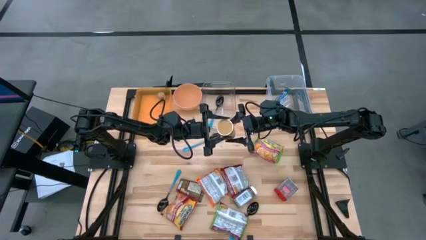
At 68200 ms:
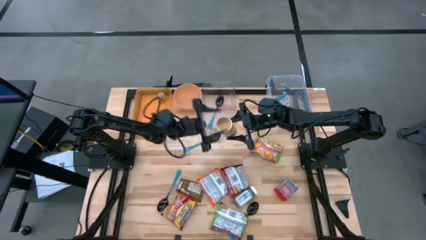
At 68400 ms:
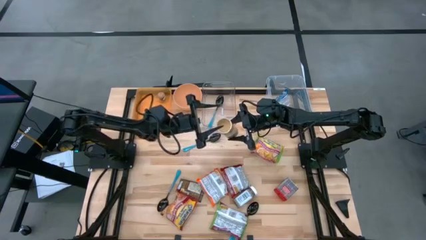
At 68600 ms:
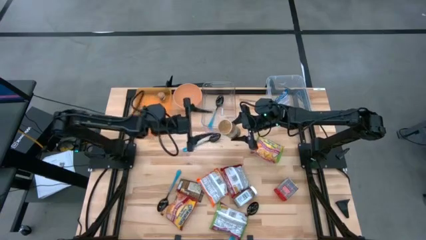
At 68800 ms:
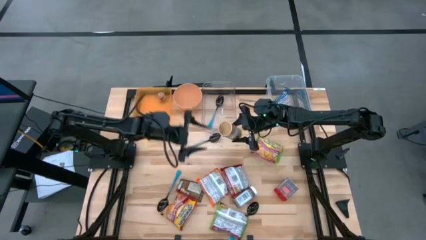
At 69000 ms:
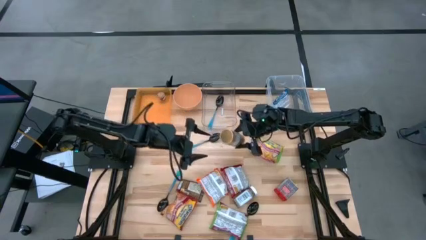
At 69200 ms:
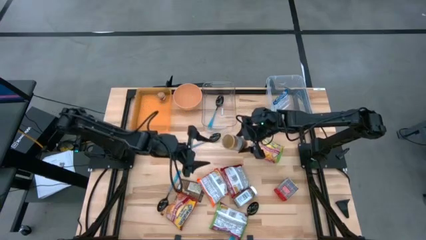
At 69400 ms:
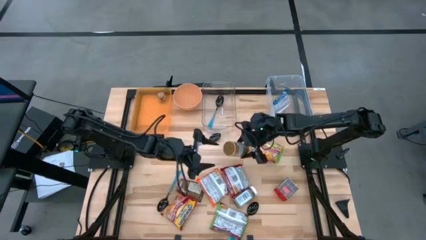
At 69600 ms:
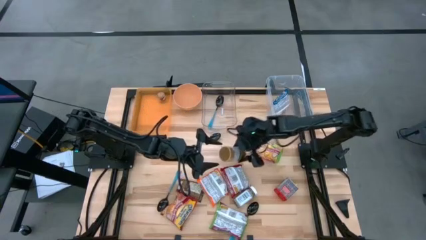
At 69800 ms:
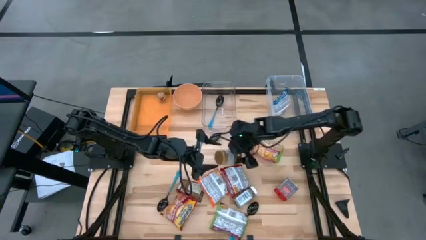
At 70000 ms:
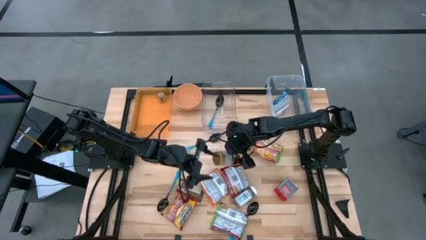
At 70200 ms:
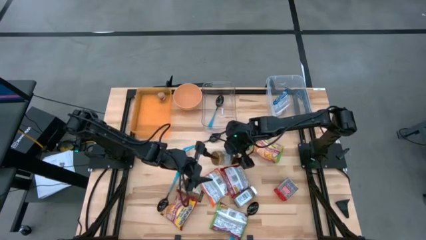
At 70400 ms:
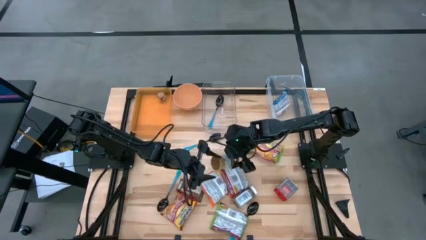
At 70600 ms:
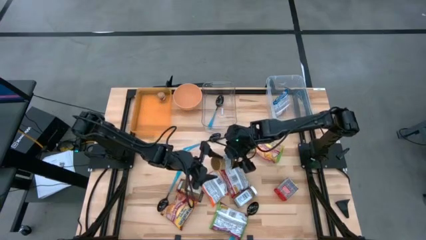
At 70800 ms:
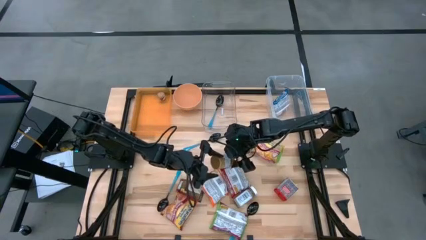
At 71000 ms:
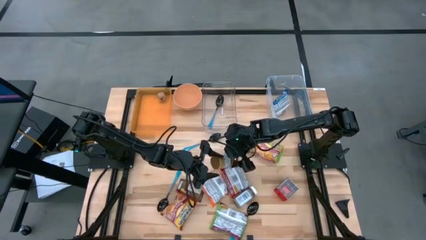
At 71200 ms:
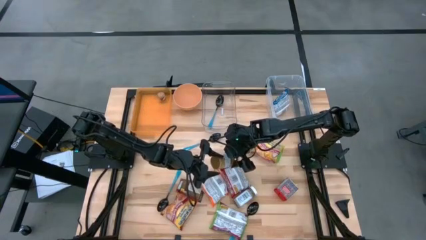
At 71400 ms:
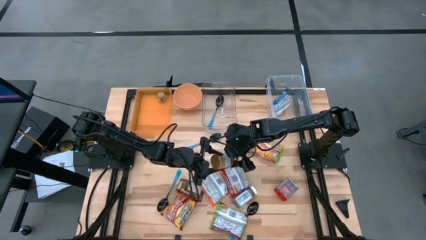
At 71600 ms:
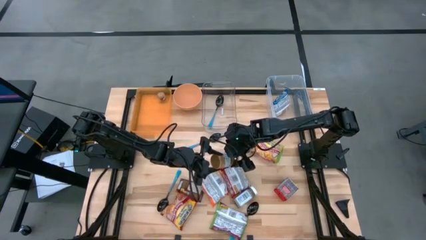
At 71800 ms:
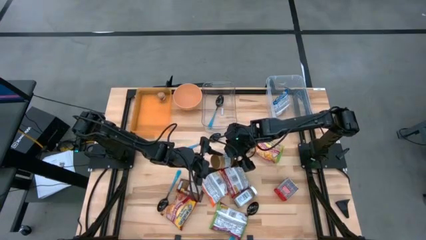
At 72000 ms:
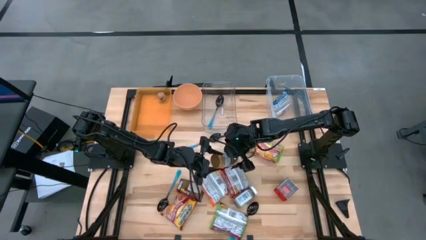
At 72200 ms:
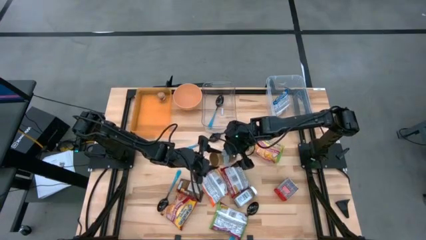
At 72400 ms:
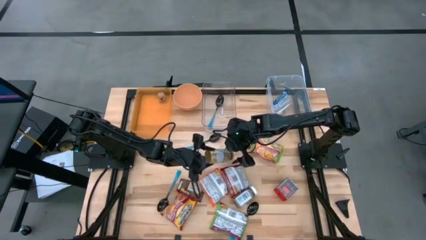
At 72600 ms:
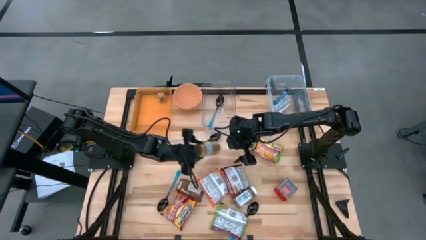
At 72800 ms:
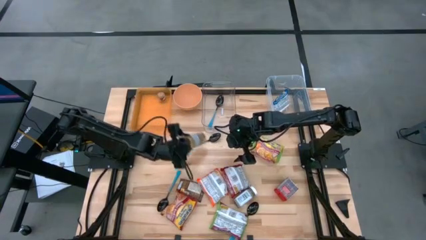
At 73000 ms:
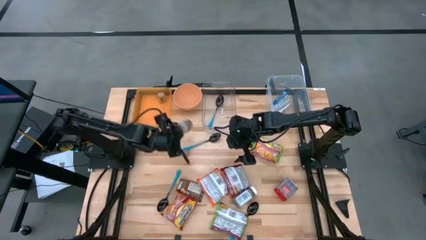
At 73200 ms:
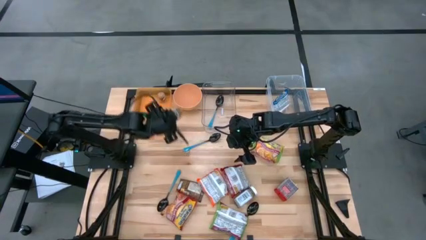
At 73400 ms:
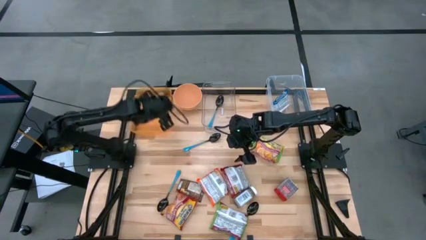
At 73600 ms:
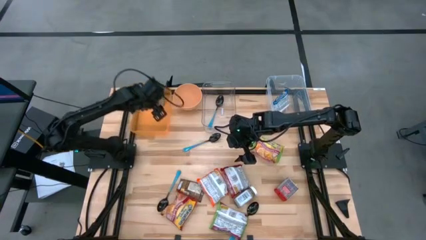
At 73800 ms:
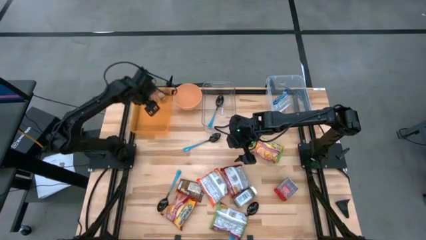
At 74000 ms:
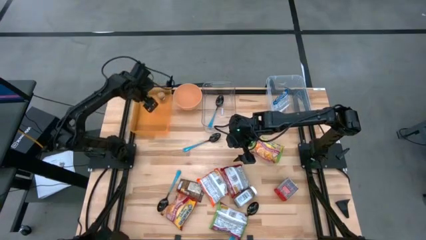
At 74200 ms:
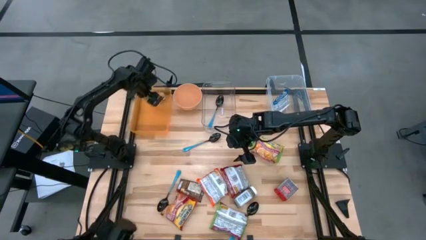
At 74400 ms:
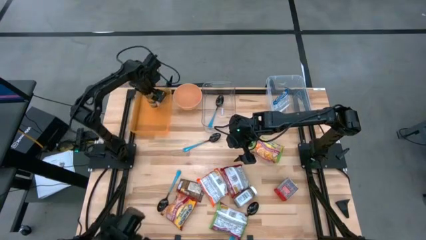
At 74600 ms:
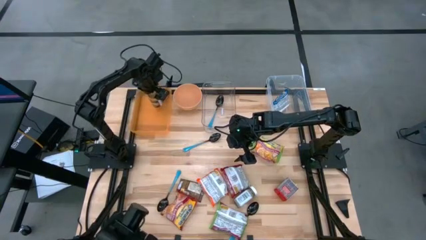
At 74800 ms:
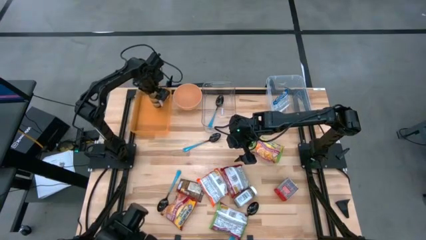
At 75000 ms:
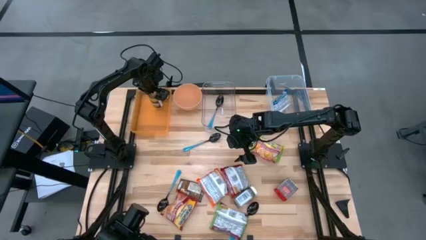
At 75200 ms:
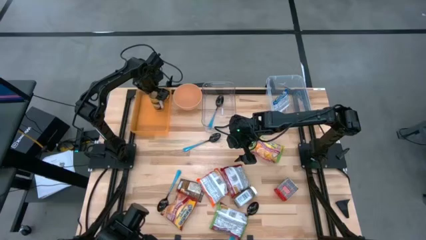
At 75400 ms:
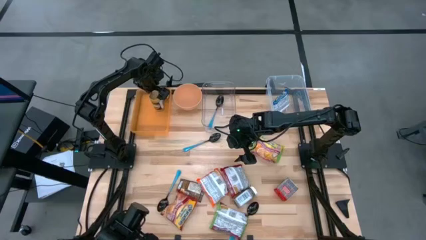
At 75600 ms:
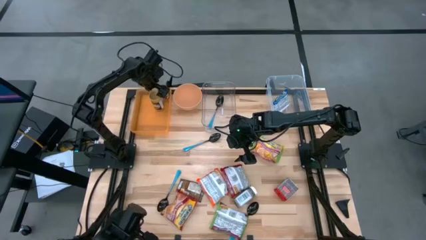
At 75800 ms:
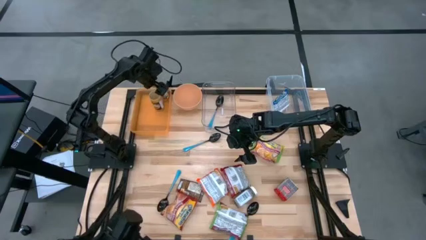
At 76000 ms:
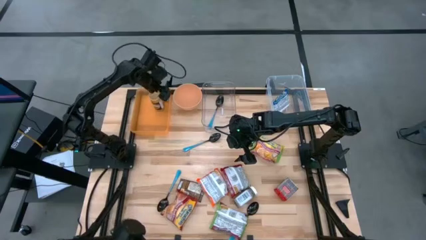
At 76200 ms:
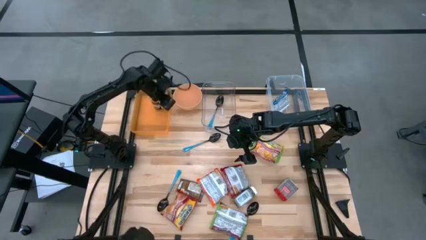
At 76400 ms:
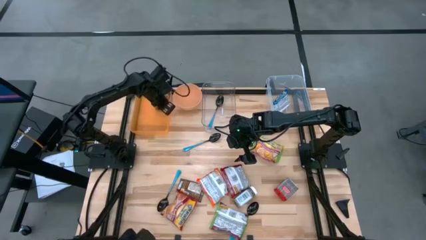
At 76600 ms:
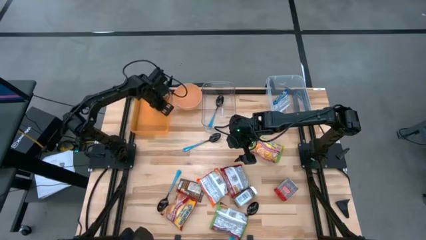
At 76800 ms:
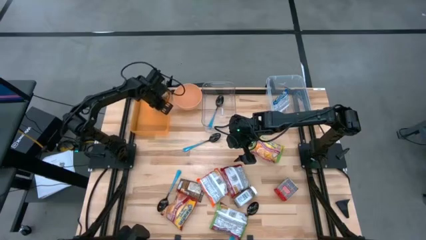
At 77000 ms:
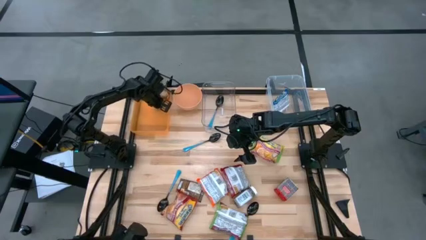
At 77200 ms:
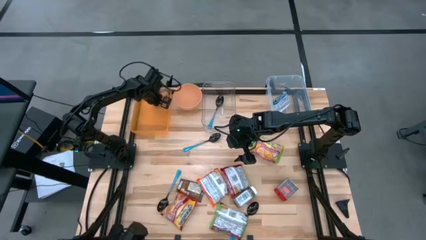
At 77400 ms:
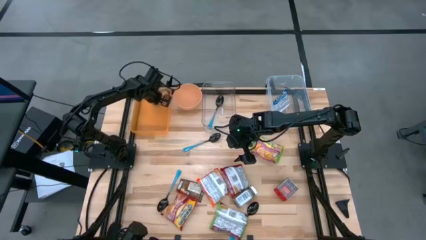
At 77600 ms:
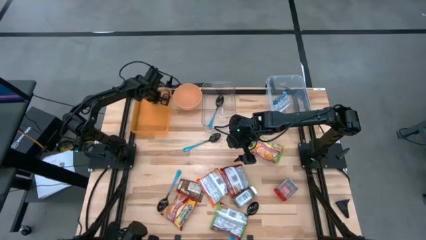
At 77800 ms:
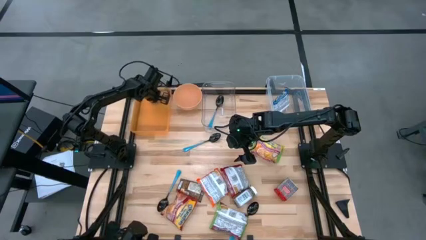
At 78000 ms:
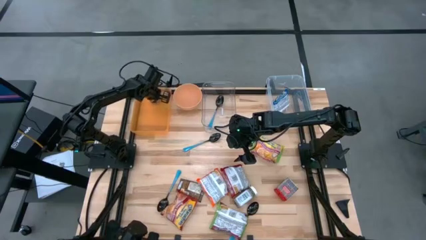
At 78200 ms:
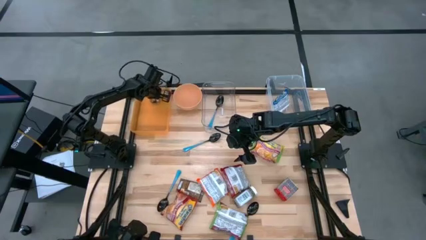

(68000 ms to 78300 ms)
Task: Pick & Place Food Item
Put the gold seasoning bottle into the orange bin

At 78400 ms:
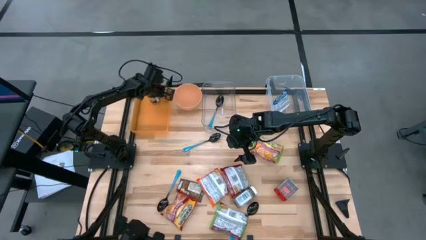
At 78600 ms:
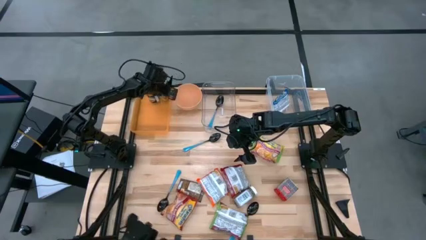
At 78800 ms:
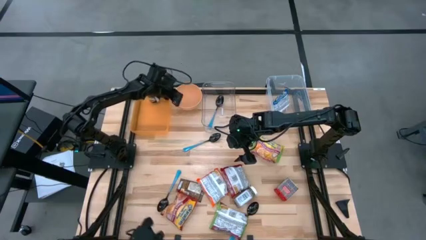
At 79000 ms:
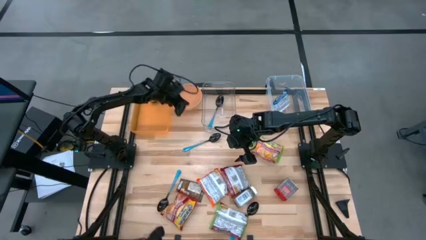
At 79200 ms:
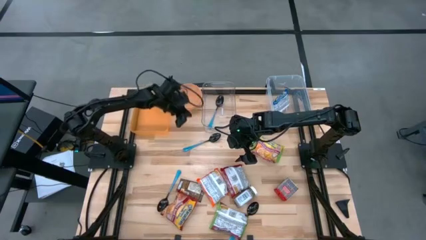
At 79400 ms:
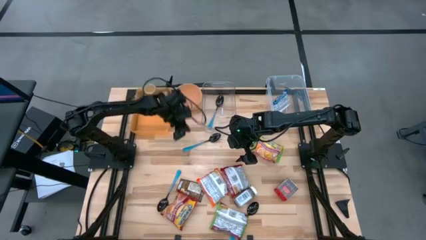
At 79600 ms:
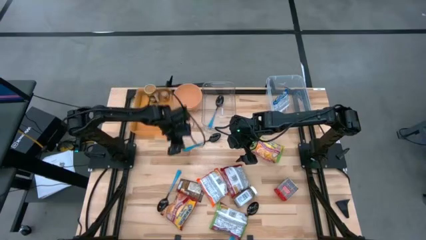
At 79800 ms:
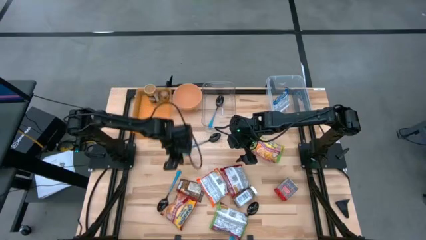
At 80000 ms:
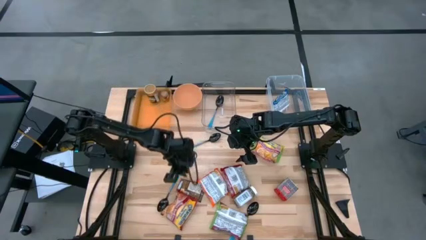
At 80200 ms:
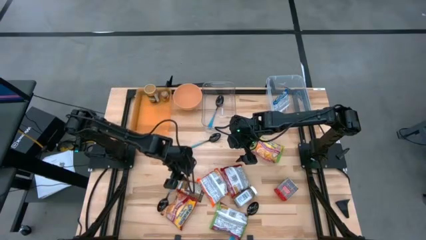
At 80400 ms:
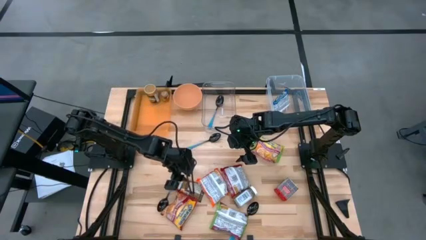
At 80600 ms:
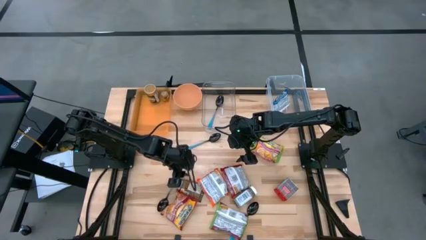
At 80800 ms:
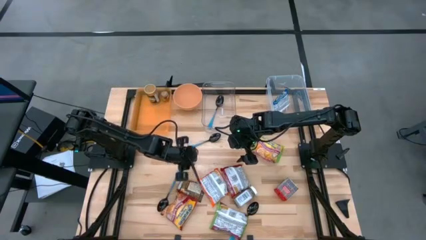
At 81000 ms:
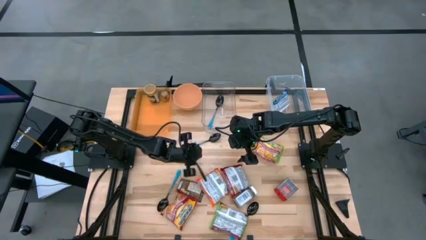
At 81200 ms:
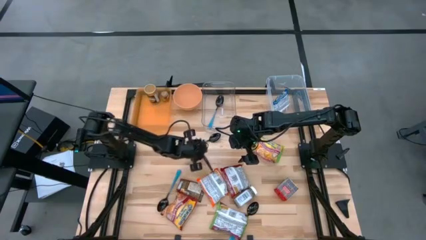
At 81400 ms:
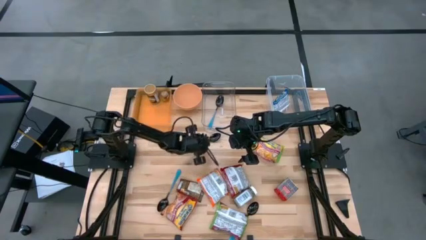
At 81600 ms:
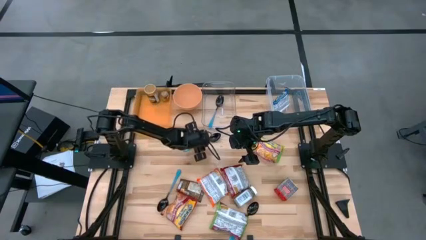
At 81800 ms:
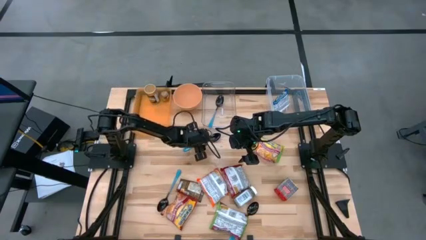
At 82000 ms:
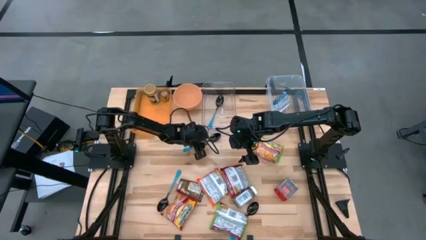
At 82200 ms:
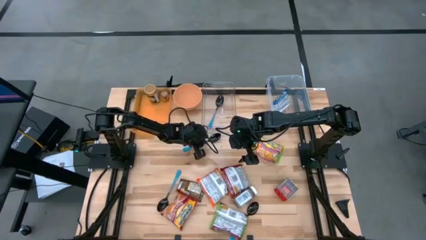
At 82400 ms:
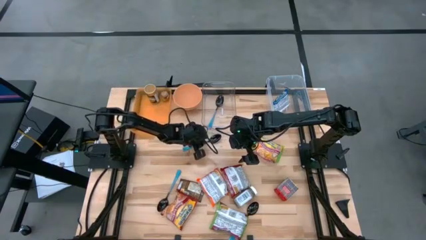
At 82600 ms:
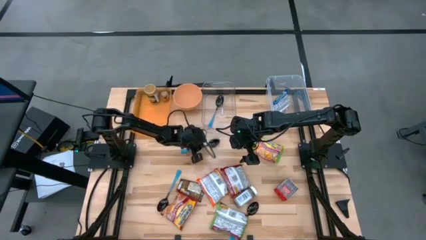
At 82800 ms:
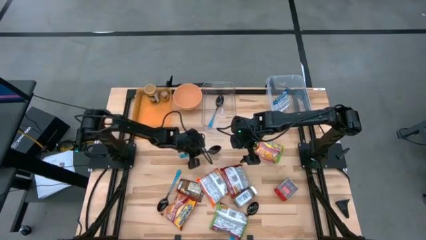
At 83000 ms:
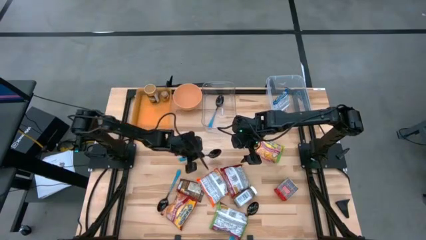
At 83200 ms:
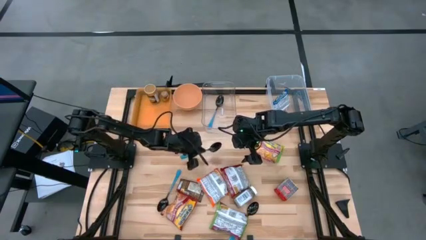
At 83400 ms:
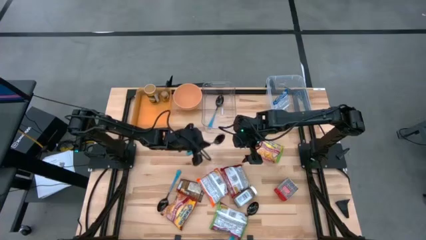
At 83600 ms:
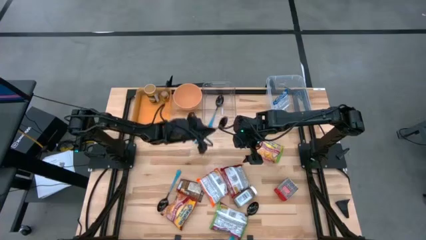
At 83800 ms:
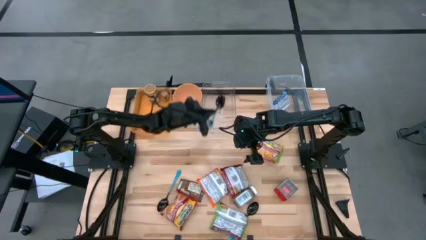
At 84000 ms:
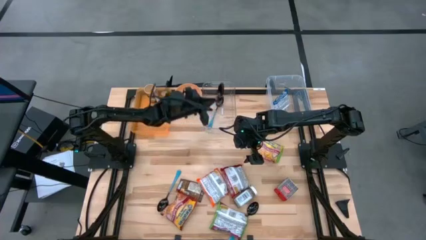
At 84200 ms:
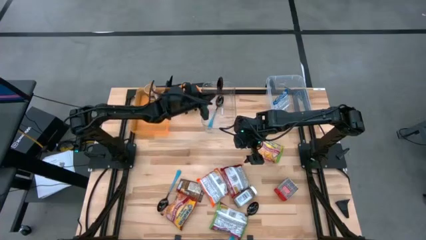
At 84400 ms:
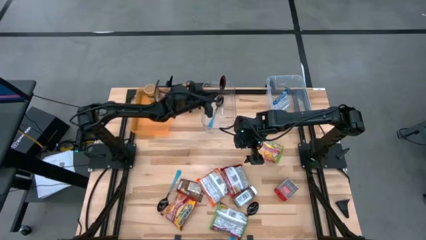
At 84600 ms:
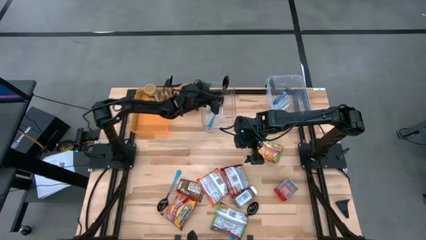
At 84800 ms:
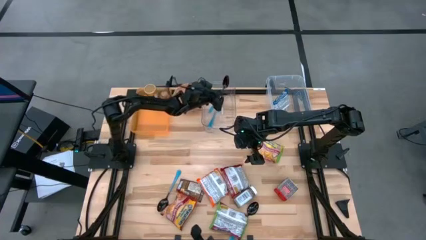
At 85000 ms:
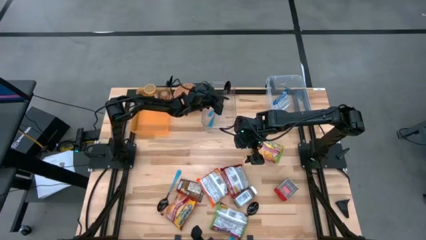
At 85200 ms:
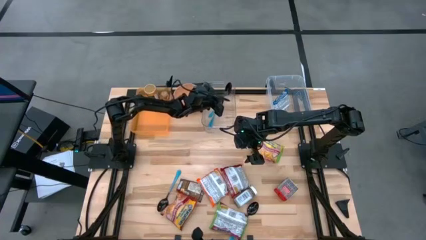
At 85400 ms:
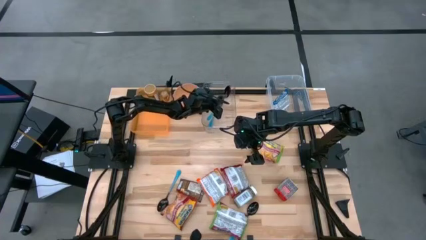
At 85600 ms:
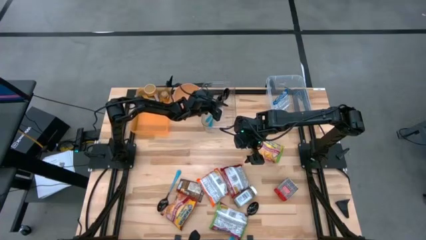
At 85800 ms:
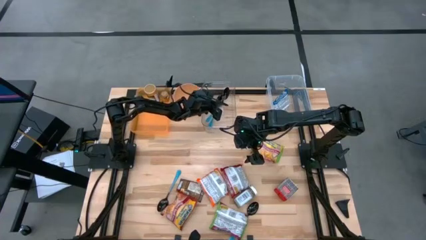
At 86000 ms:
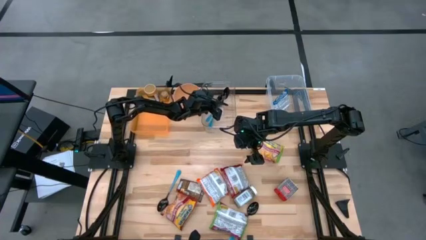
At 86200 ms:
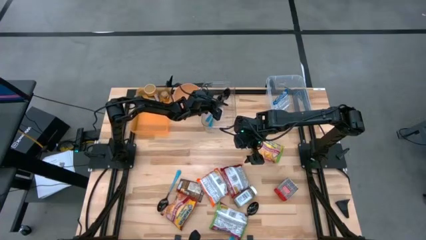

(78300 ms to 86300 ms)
Put the blue spoon into the transparent bin
